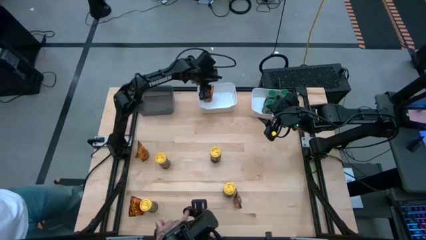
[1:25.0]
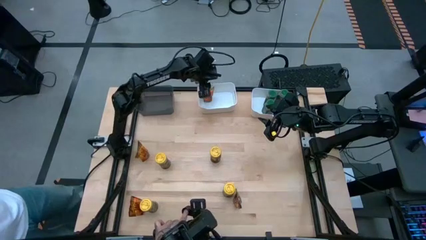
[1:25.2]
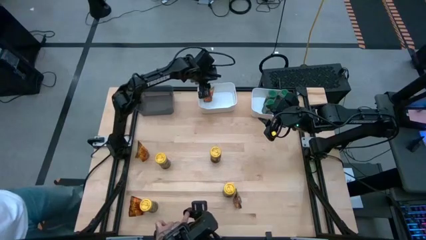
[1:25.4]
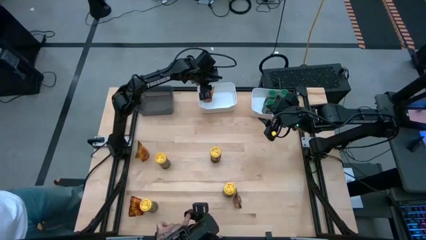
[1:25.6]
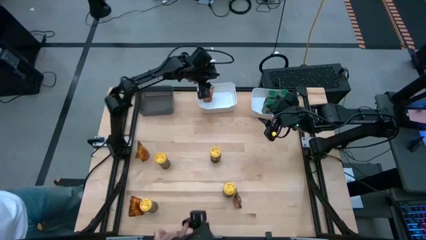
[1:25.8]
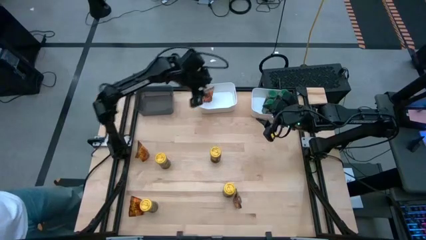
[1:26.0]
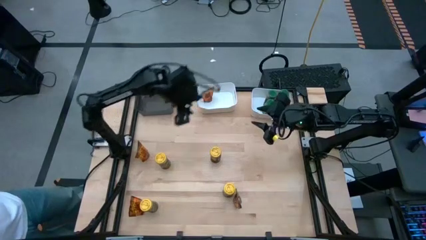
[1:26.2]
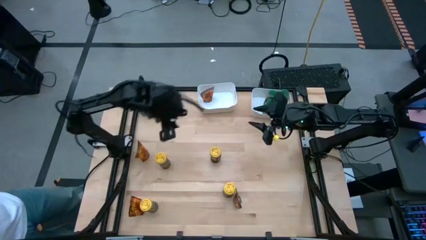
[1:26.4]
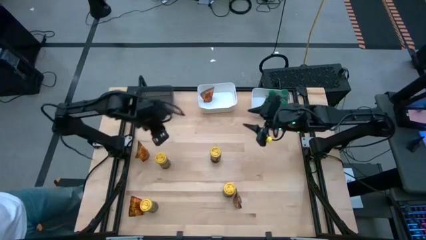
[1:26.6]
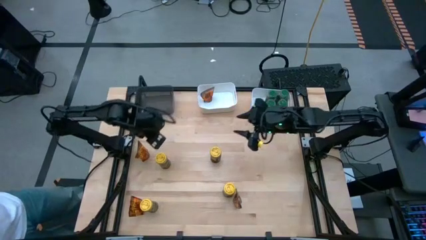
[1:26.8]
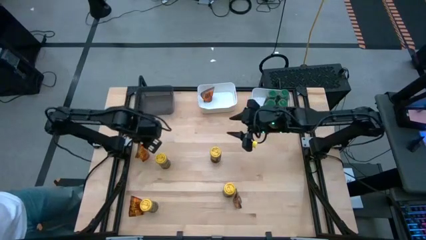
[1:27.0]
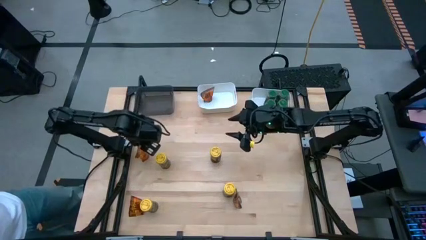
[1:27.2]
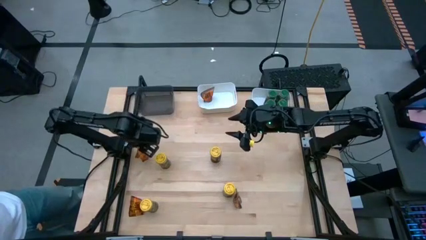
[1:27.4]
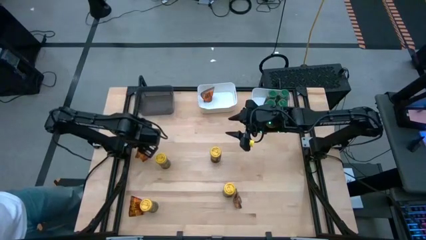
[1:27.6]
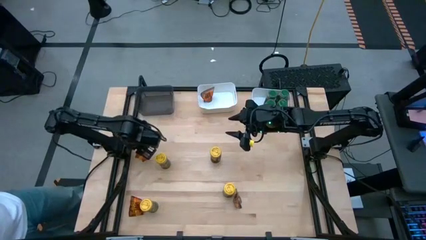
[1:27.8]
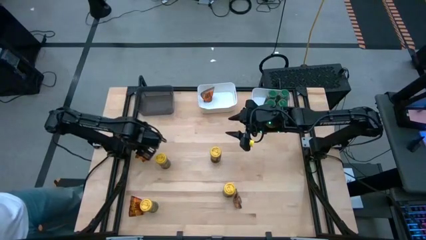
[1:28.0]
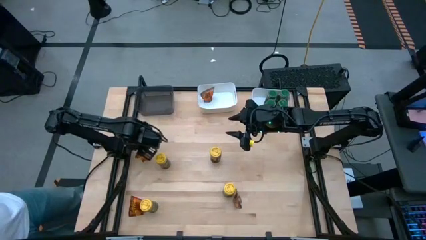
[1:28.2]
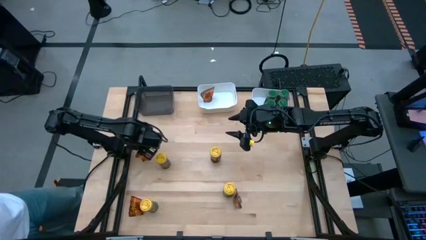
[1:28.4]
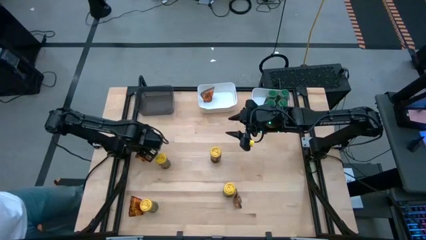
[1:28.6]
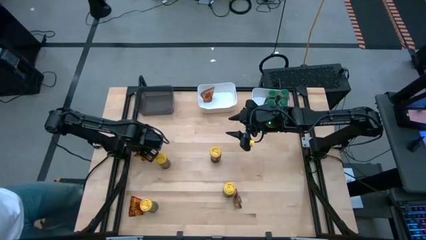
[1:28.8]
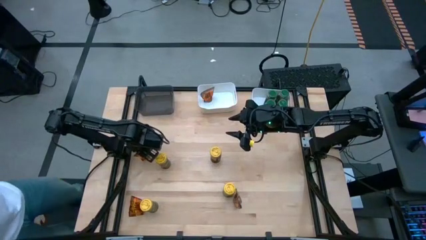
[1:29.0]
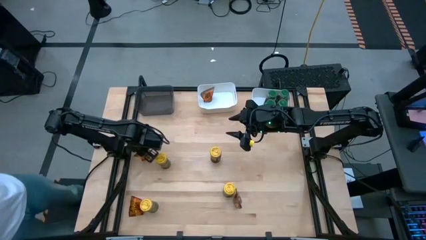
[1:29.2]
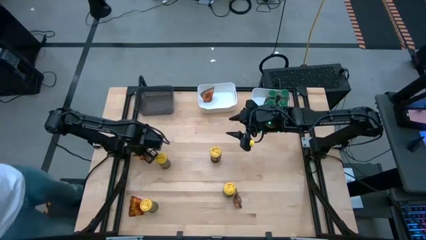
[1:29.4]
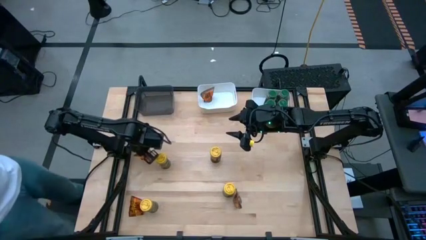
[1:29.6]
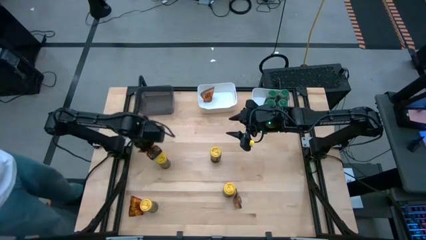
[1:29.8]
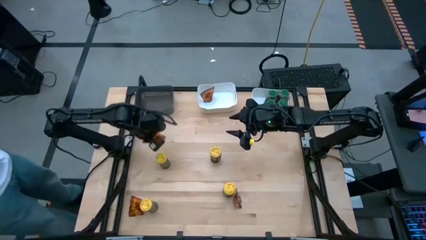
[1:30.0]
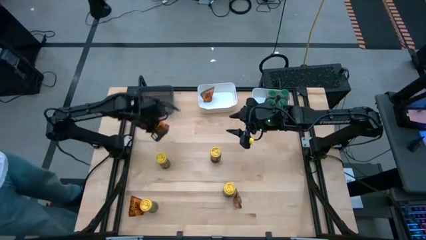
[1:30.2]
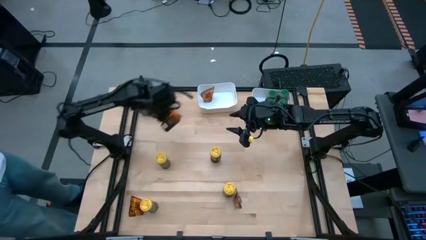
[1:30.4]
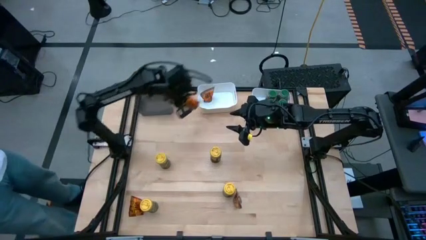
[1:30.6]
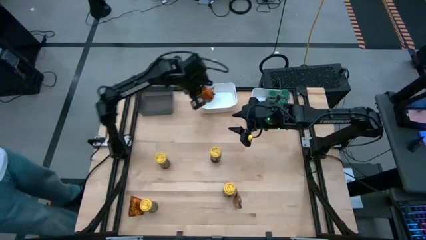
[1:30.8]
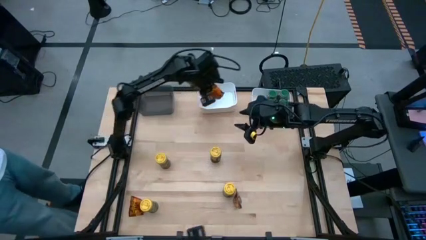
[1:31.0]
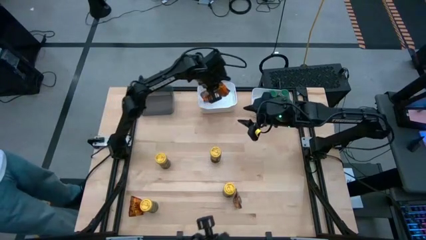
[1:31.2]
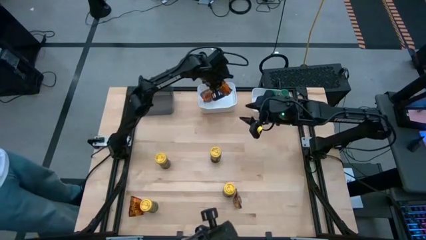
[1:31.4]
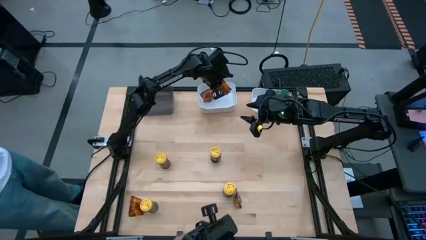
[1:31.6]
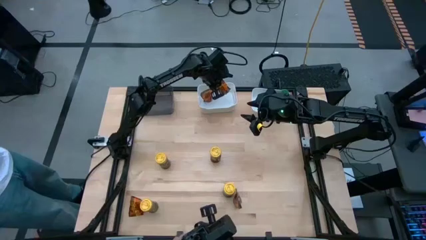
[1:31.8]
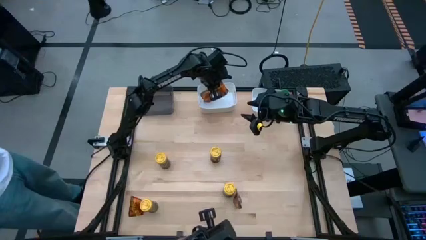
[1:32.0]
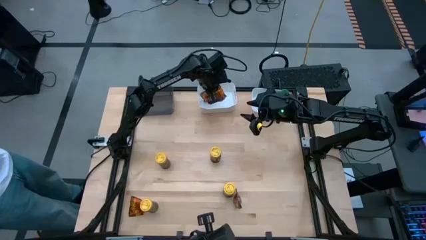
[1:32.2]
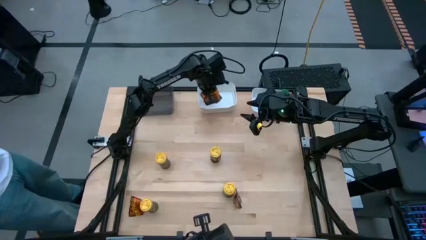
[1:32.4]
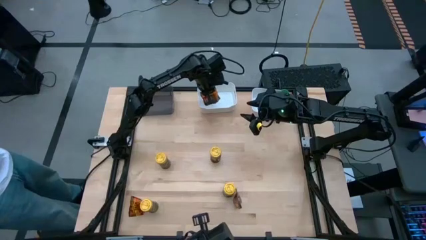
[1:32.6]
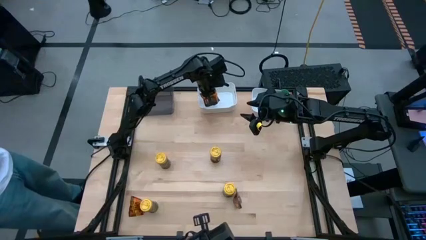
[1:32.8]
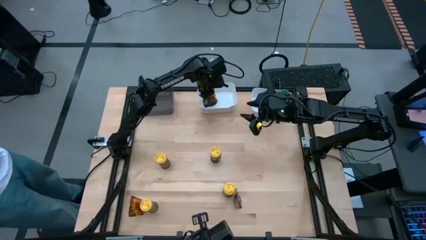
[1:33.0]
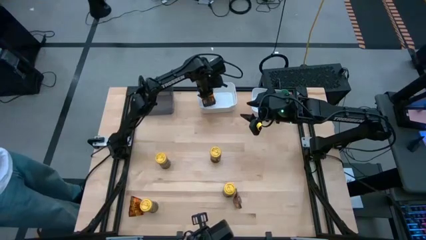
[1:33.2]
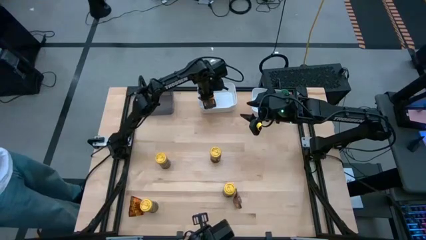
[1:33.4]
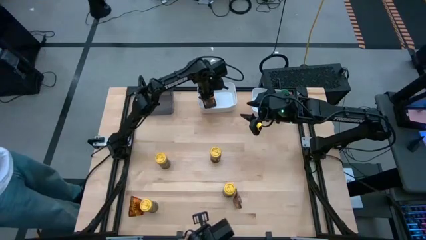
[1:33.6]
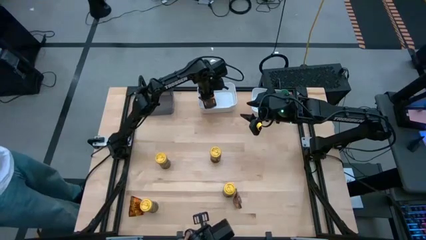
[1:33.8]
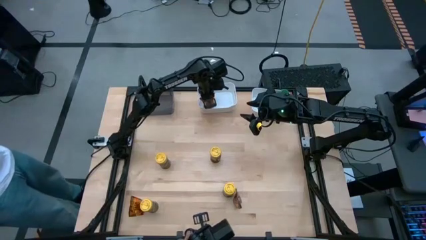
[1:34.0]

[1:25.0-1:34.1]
Task: Sort spices by type
Put the top left orange seasoning bag into the left white bin

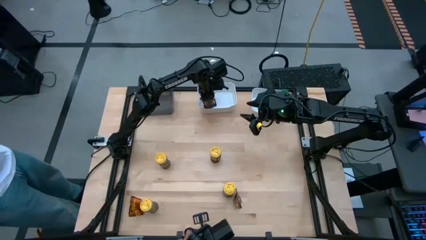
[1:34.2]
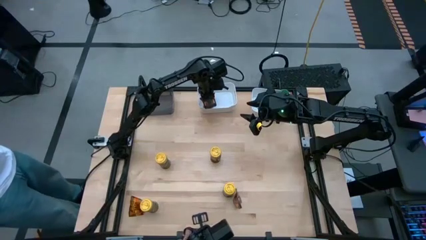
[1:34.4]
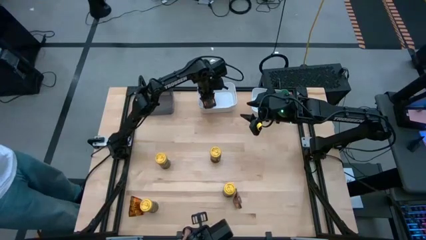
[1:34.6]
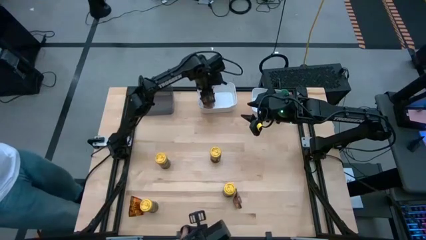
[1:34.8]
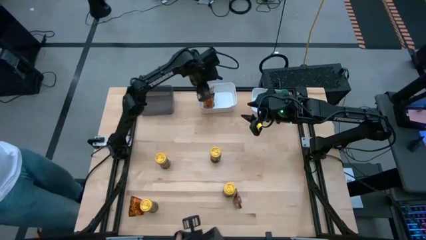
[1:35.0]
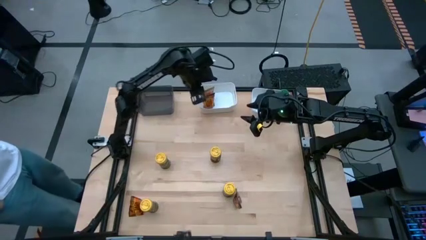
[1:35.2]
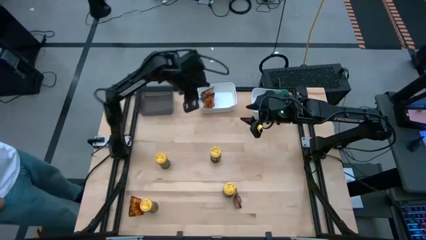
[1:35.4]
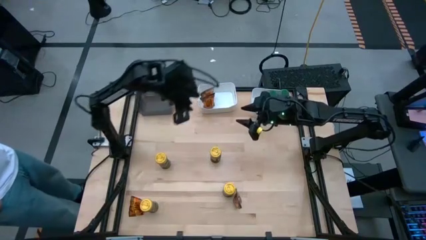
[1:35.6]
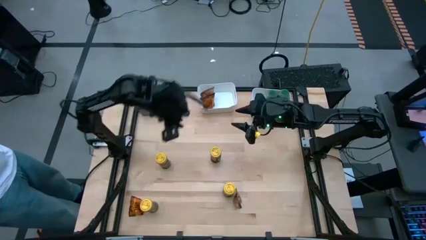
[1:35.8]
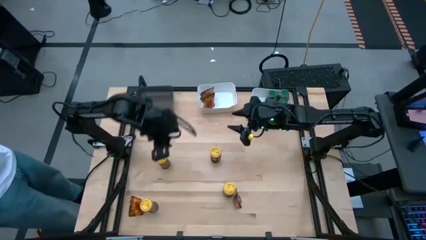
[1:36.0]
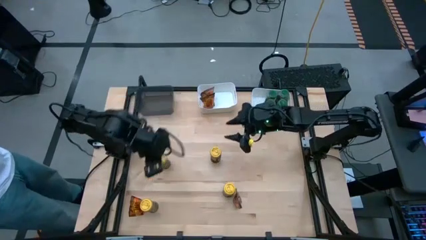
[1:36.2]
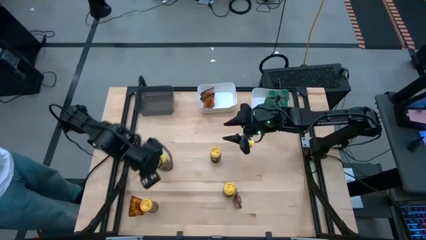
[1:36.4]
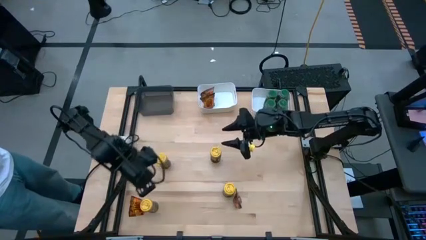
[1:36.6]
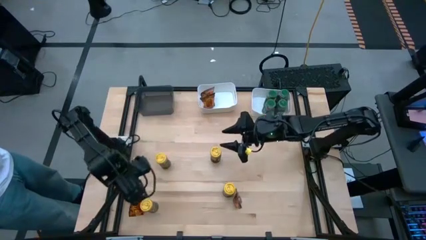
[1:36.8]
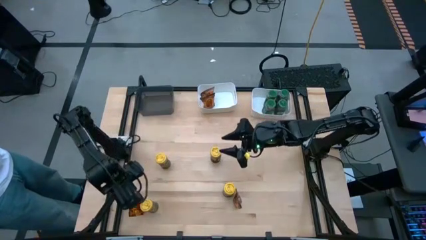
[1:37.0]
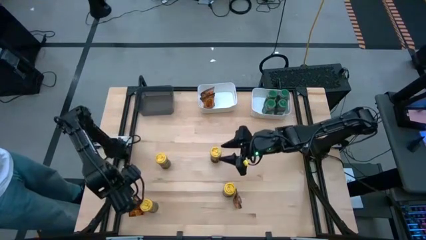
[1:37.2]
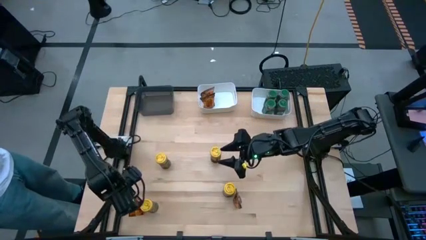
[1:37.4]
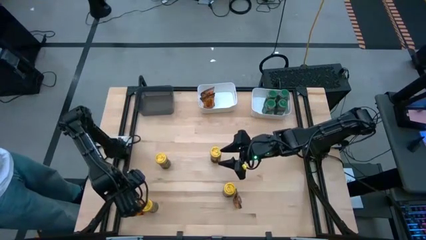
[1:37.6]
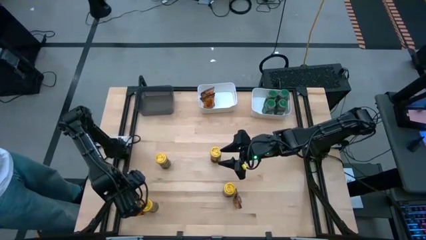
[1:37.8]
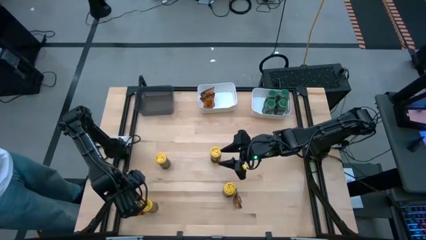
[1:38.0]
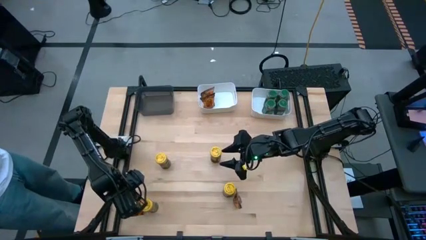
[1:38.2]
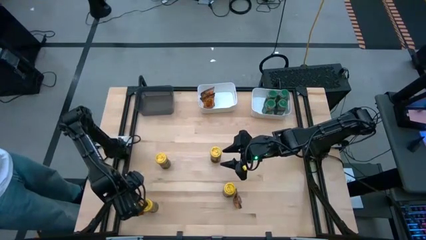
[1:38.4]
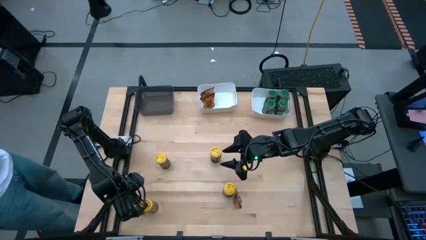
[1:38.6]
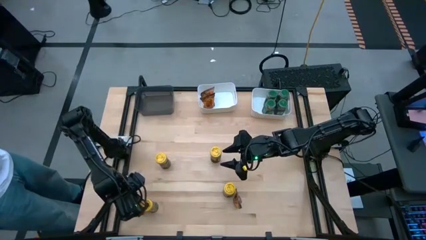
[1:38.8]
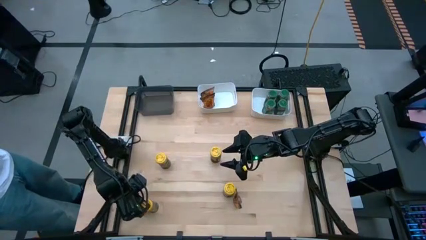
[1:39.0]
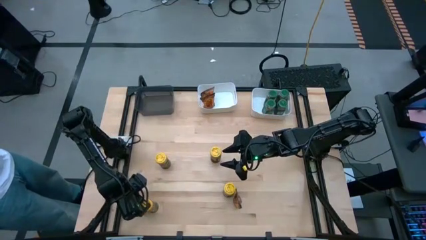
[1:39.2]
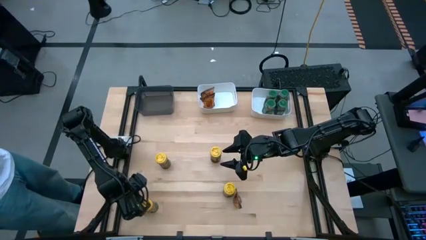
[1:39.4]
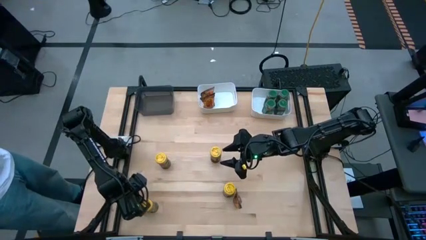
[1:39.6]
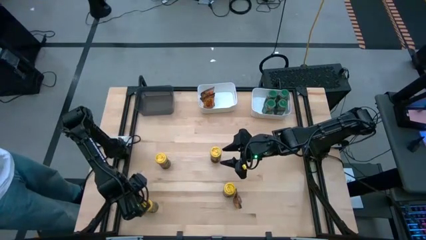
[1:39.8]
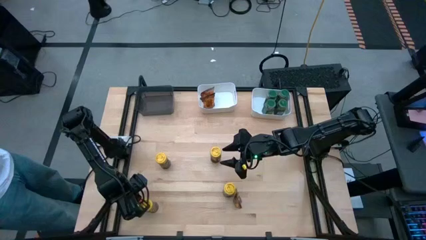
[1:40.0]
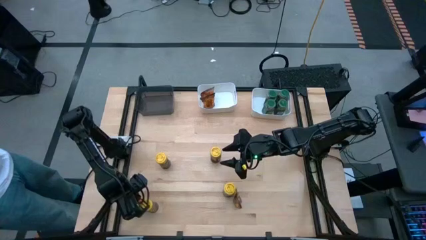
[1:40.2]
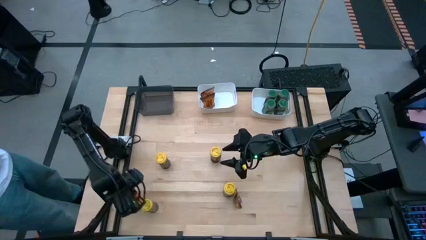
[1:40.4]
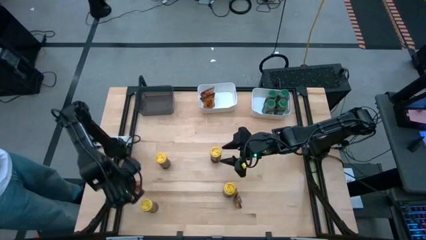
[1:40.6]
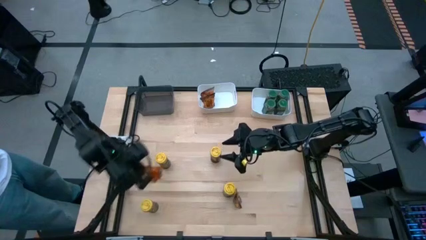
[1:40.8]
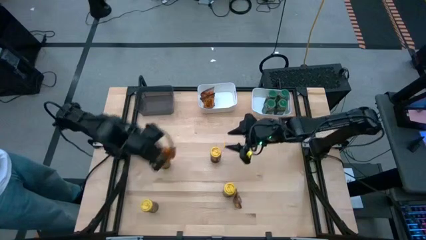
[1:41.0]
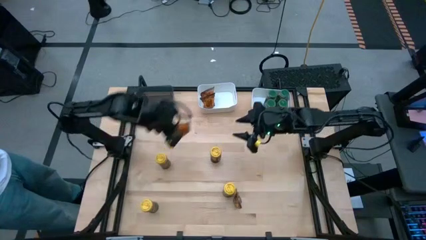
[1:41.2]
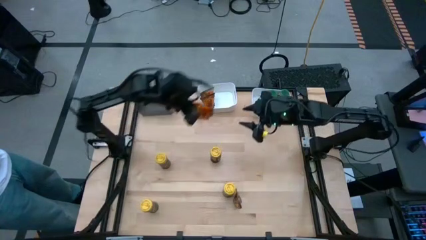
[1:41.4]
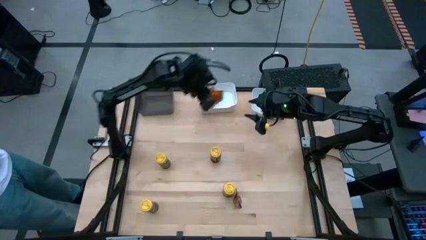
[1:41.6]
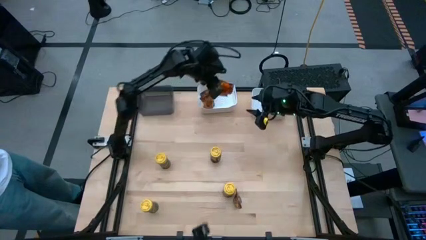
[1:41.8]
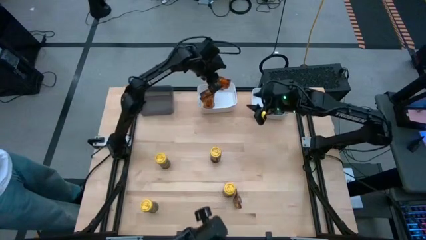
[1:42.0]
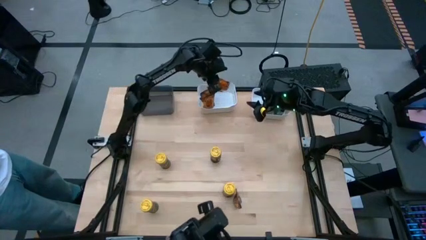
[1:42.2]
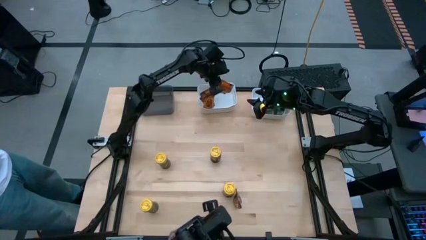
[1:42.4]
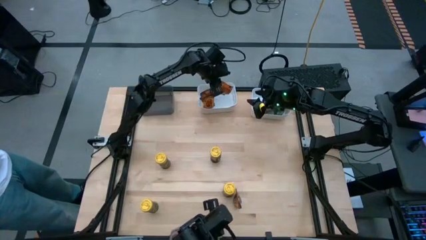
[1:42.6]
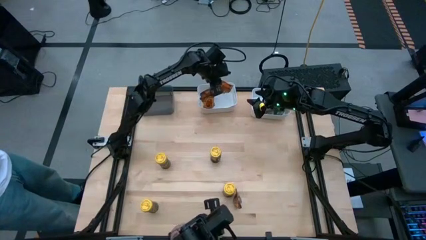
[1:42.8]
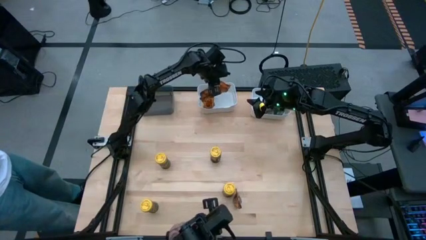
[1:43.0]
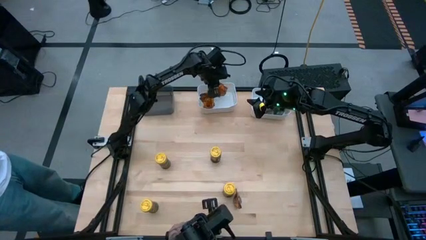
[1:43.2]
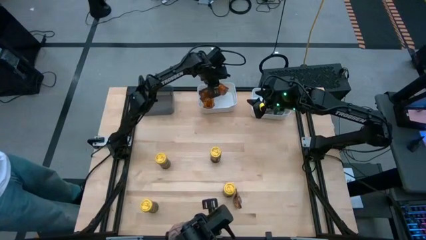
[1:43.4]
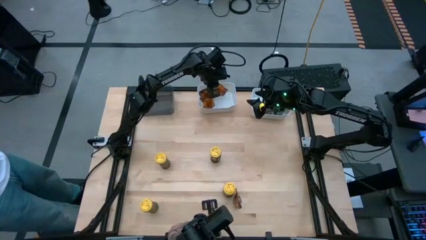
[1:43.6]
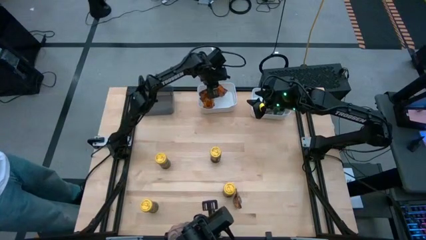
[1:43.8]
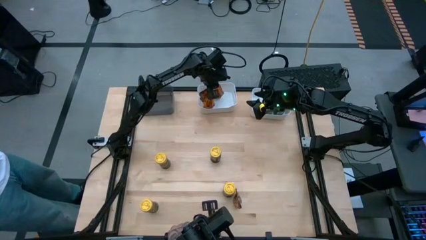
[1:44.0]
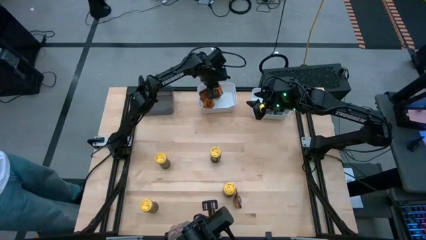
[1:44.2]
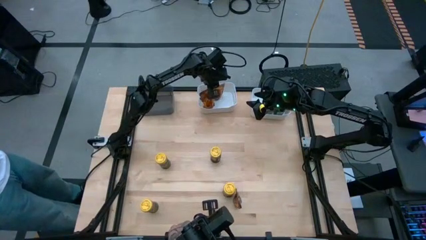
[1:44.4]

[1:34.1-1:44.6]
Put the left orange seasoning bag into the left white bin
